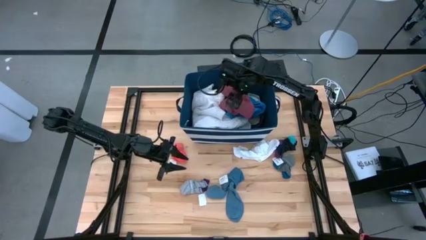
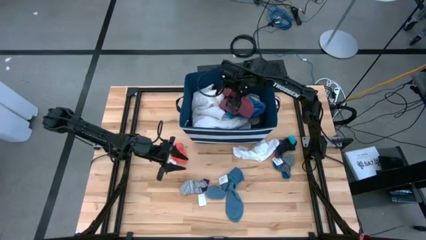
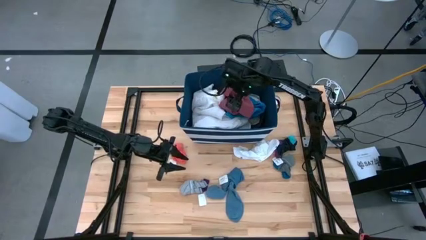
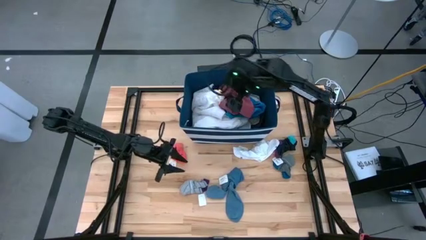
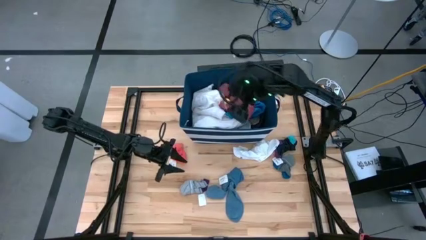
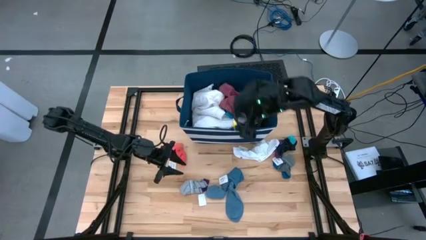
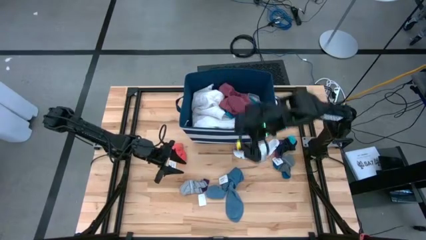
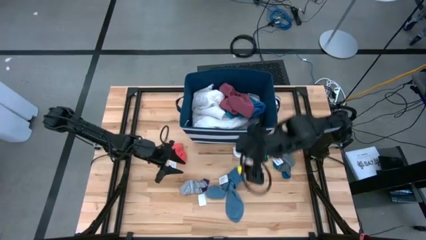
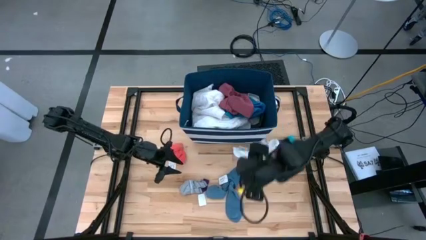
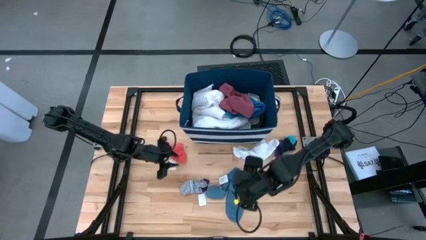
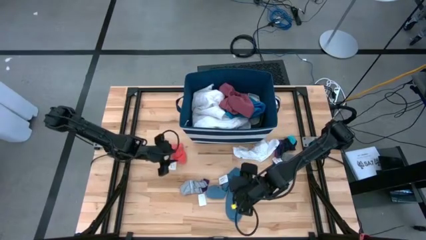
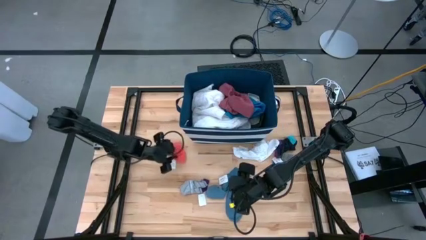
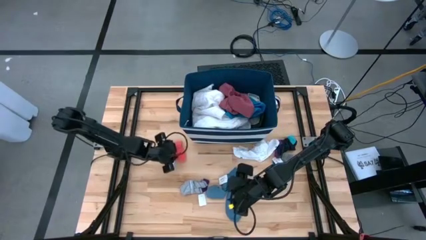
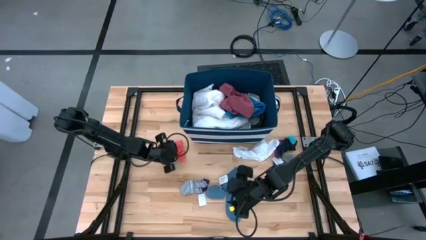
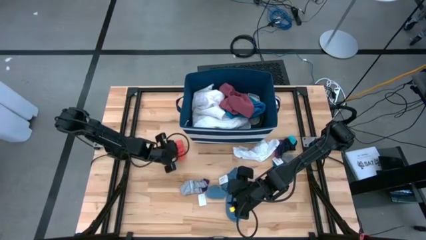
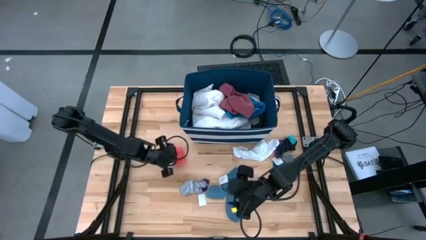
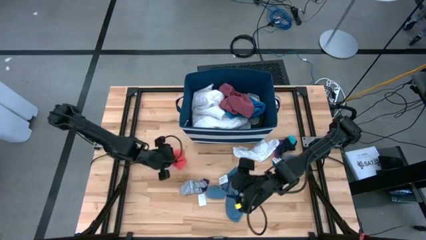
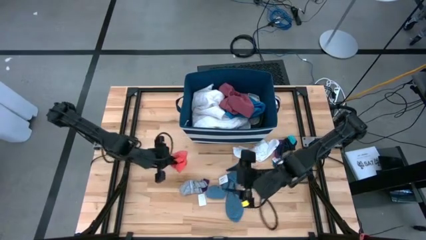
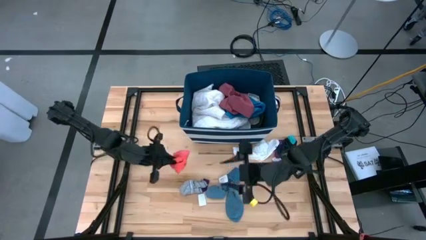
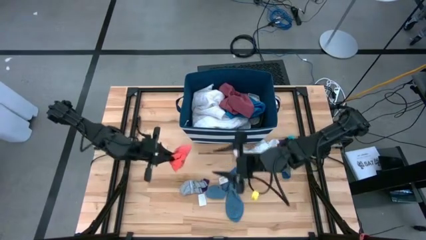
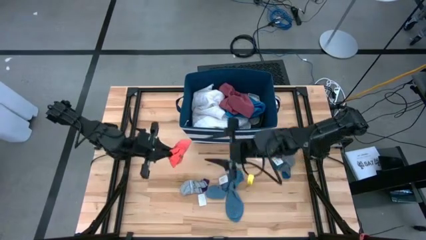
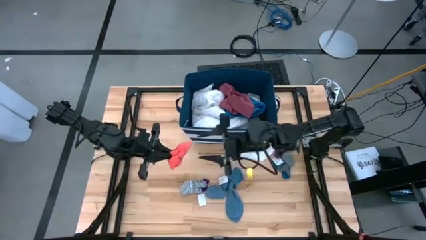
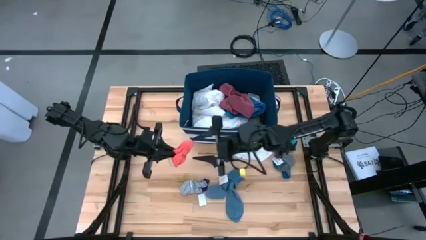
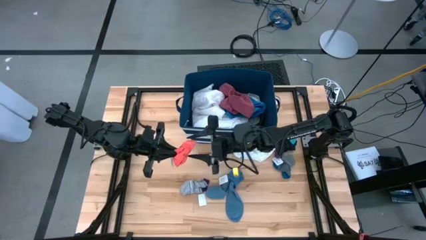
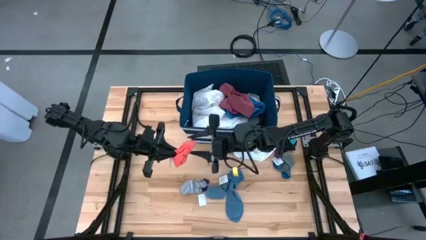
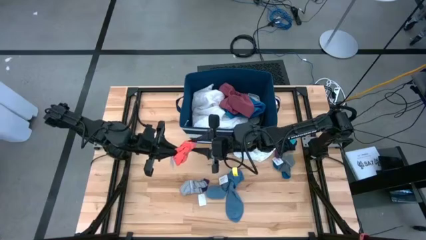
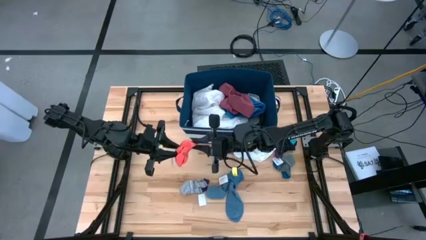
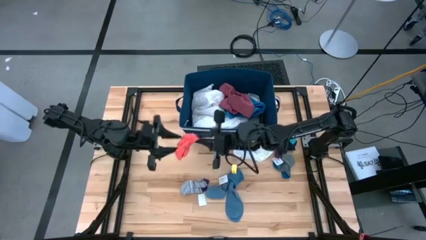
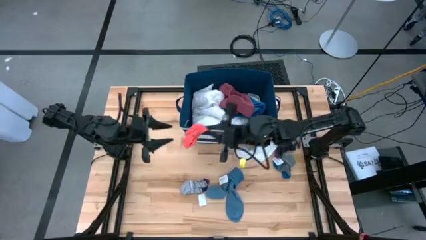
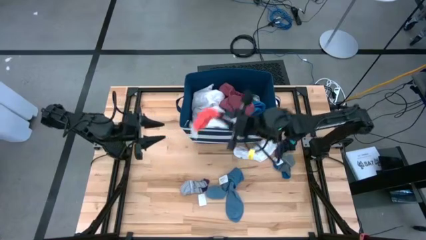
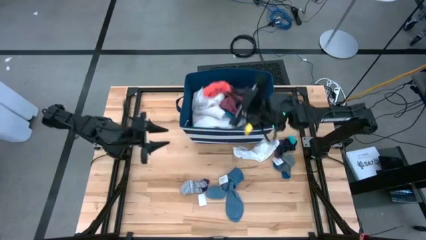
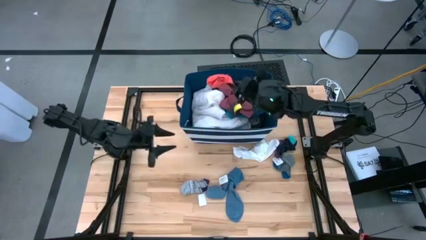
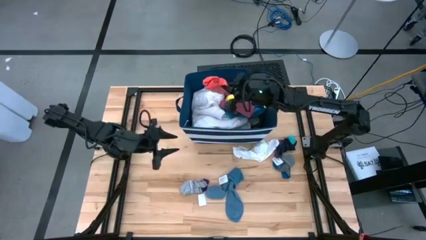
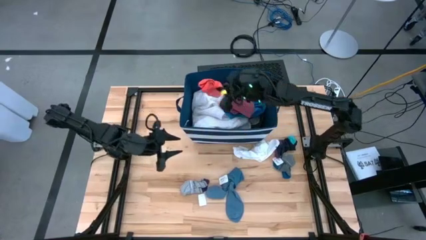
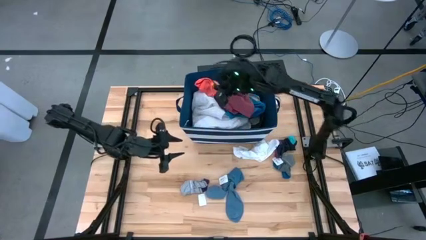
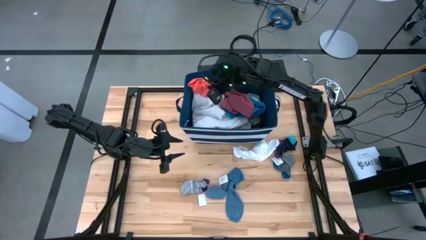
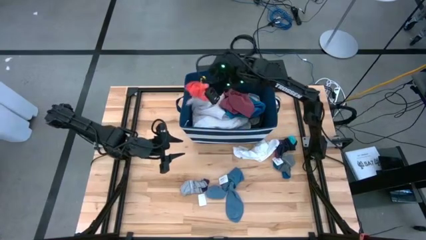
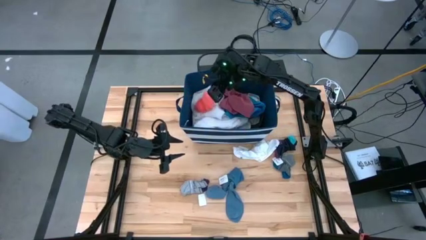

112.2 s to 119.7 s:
Task: Sort clothes
Put the orange socks into the blue laundry organizer

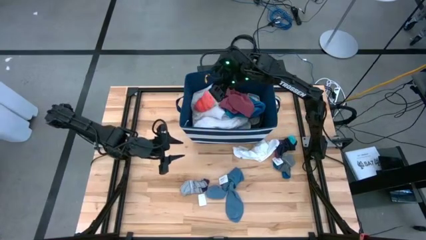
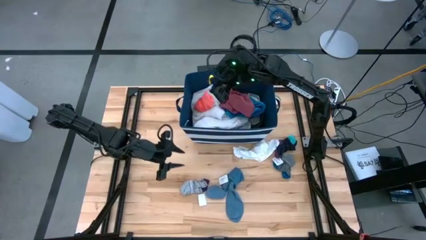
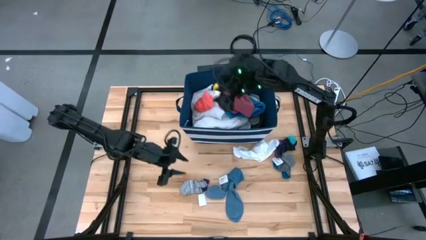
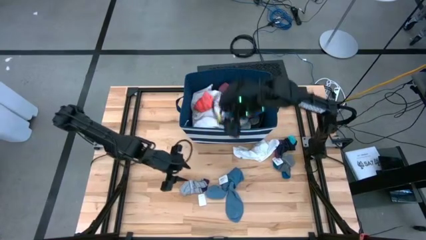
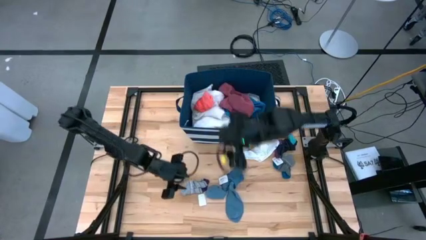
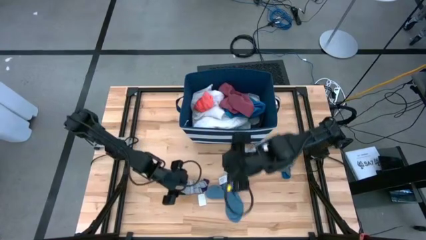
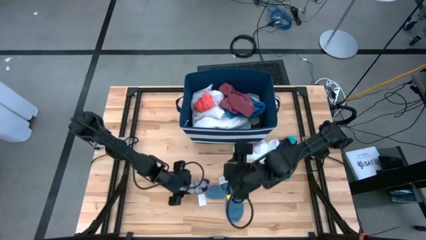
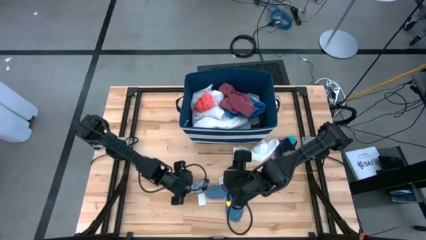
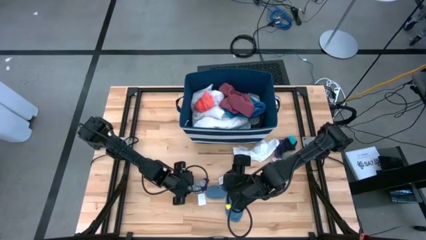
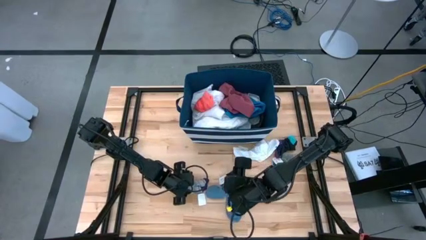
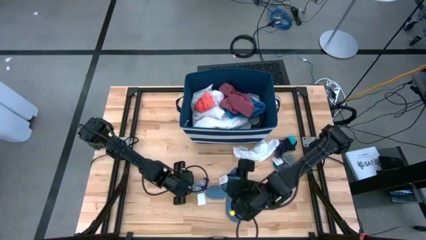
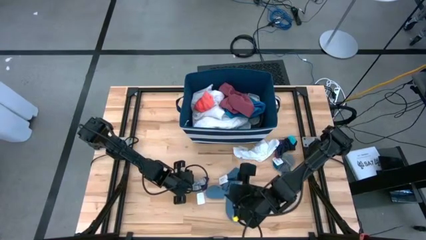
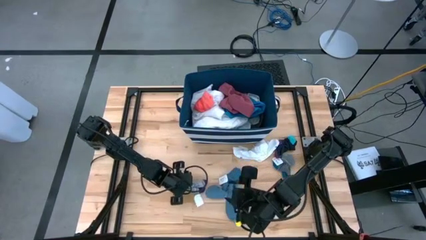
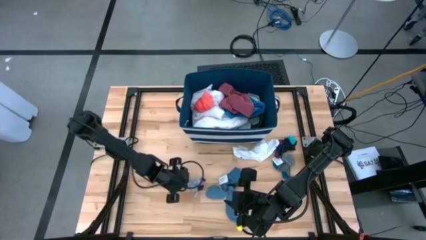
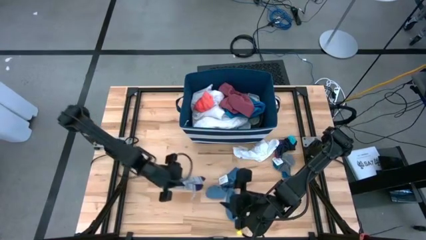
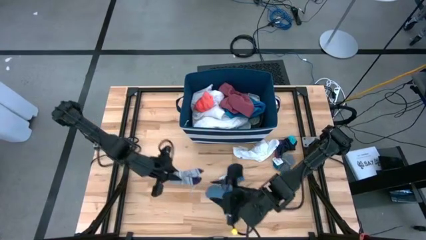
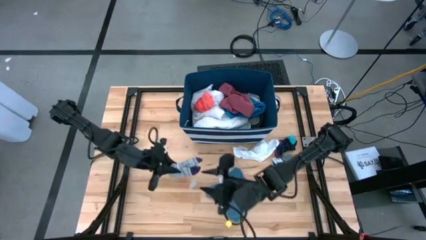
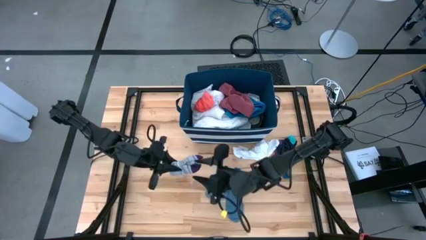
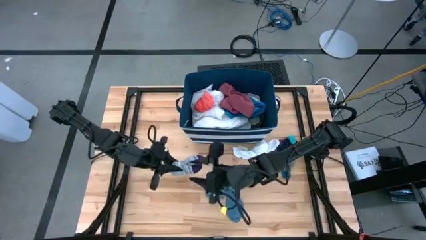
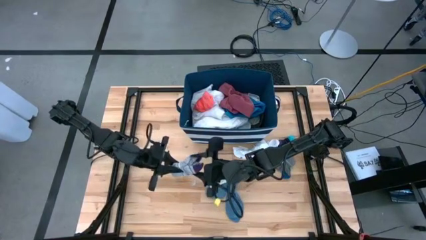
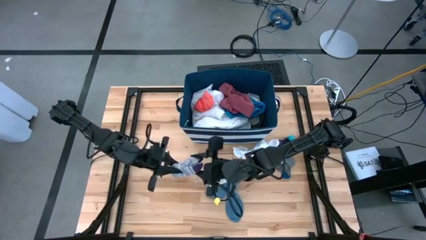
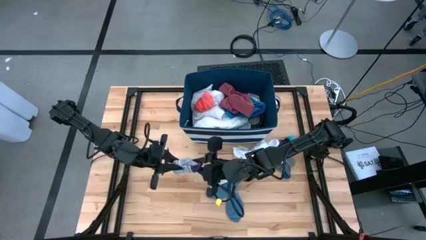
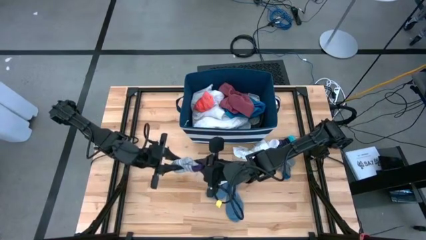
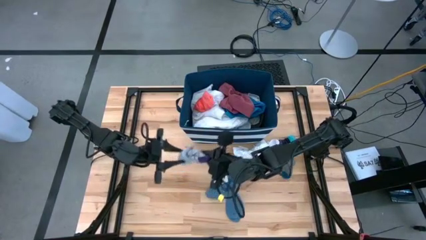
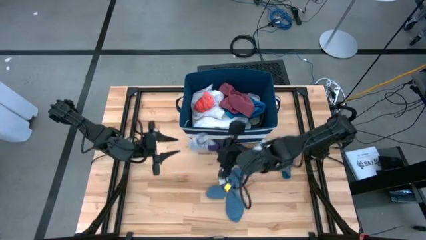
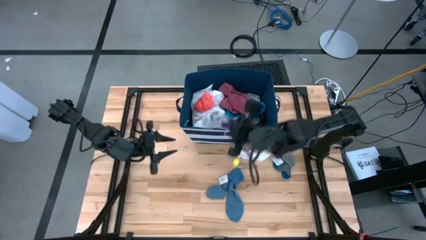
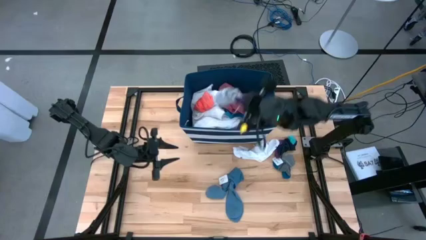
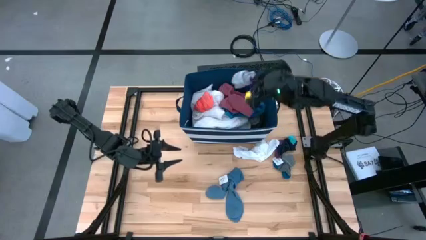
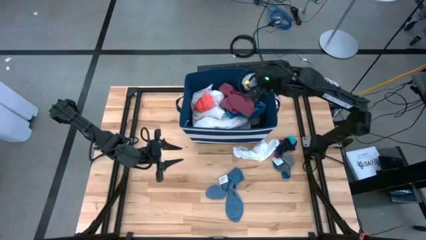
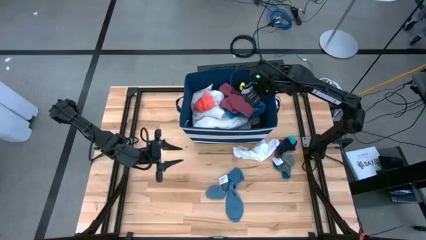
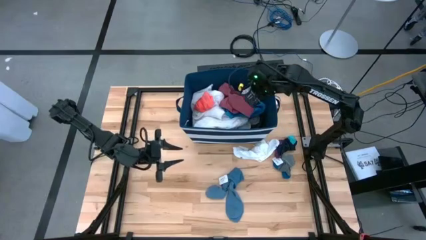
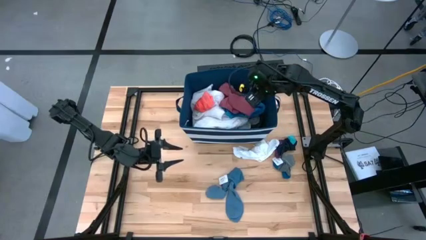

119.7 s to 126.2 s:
Put the gray and purple socks into the blue laundry organizer
